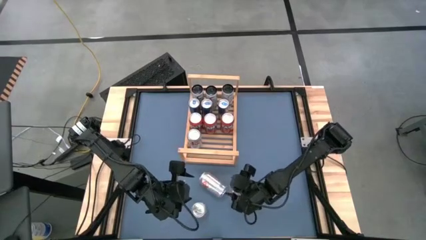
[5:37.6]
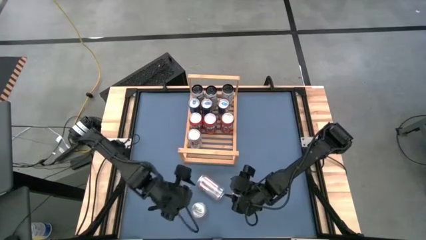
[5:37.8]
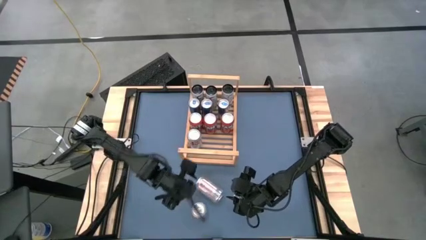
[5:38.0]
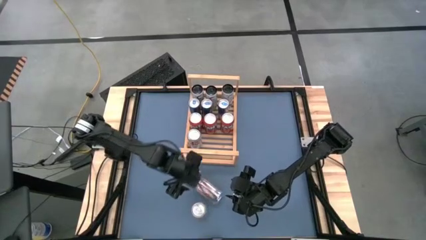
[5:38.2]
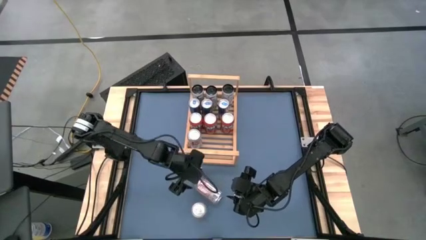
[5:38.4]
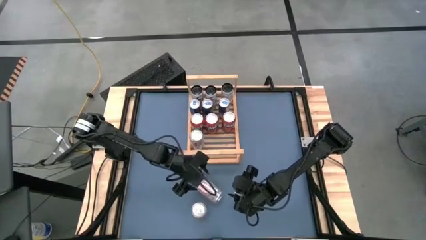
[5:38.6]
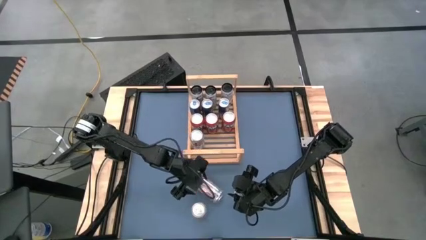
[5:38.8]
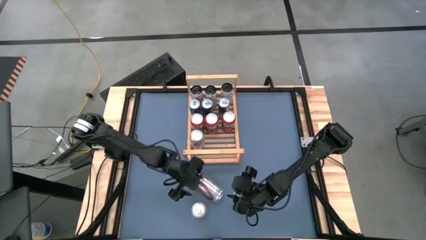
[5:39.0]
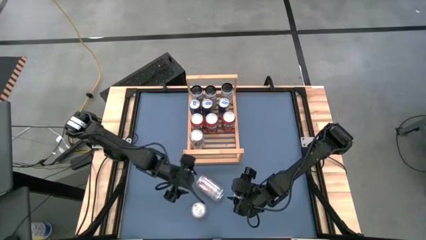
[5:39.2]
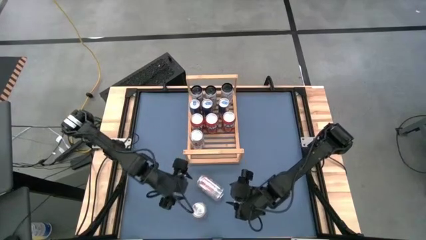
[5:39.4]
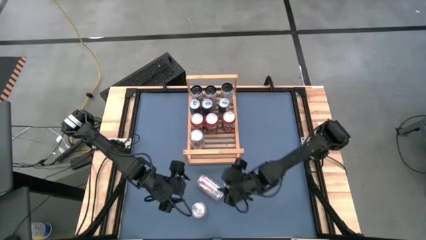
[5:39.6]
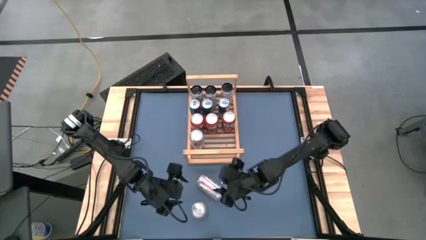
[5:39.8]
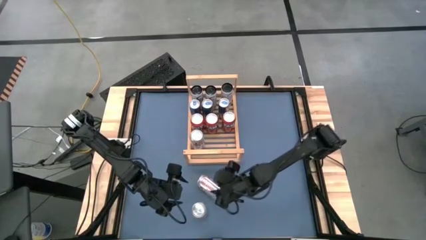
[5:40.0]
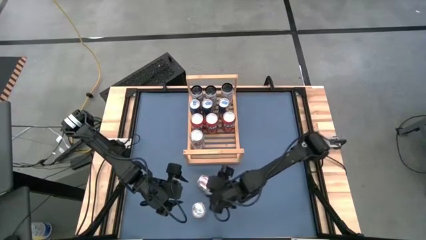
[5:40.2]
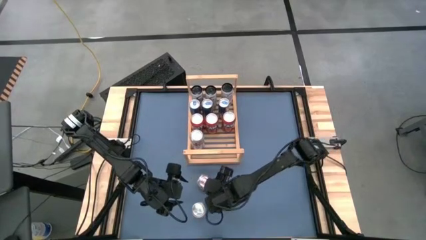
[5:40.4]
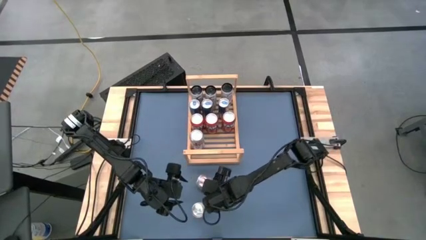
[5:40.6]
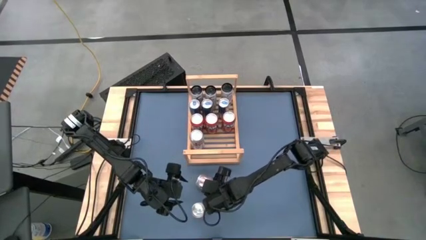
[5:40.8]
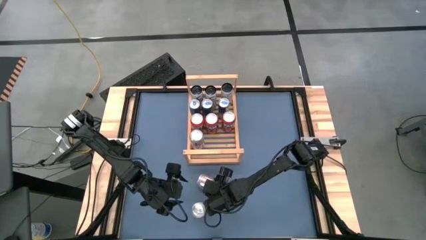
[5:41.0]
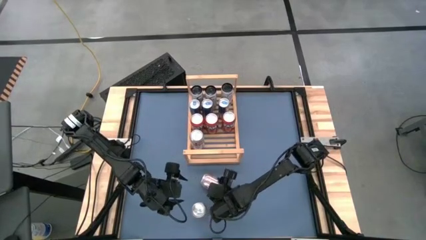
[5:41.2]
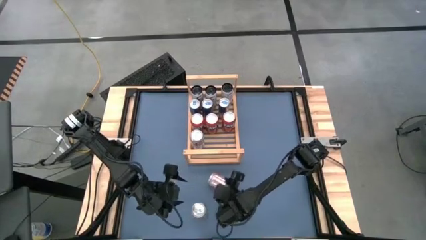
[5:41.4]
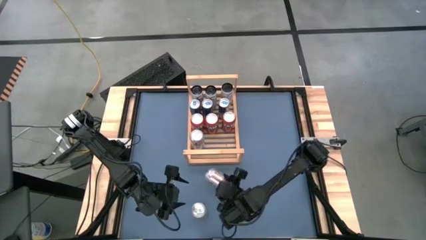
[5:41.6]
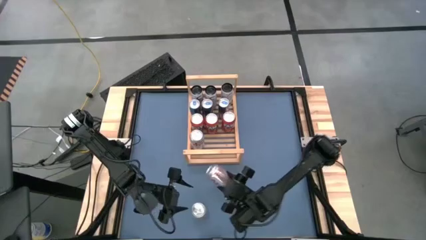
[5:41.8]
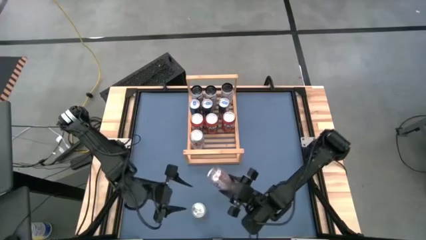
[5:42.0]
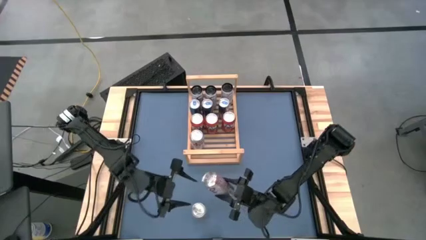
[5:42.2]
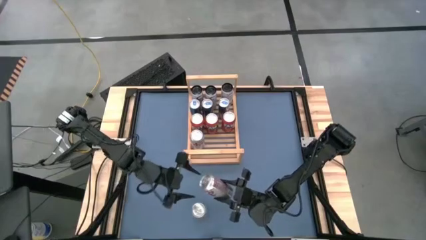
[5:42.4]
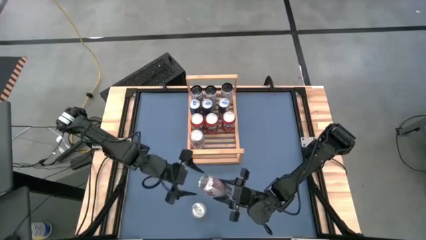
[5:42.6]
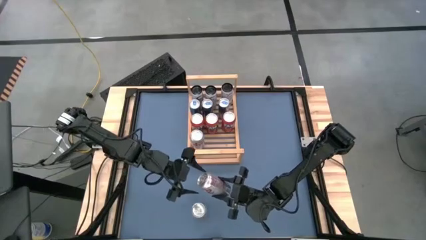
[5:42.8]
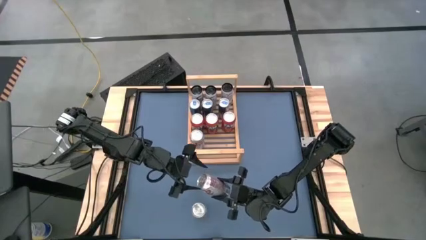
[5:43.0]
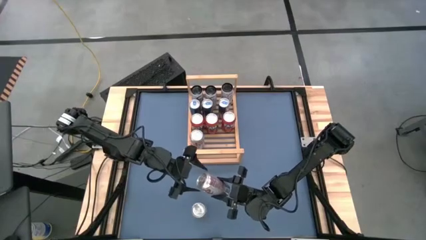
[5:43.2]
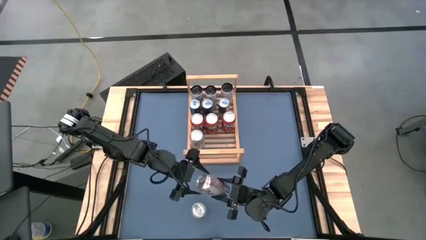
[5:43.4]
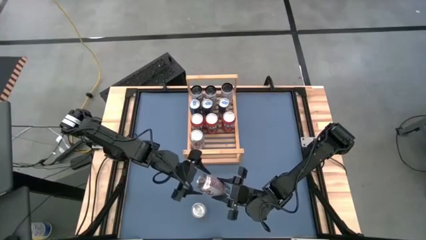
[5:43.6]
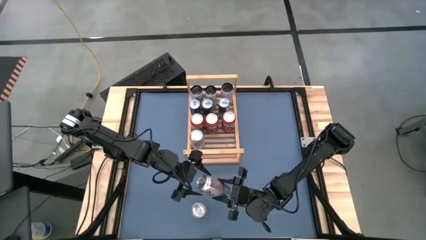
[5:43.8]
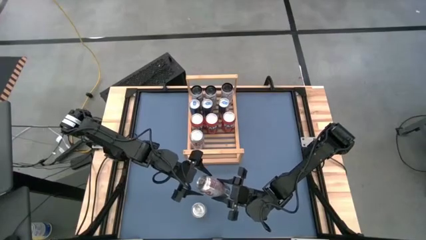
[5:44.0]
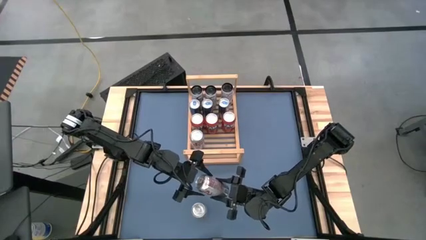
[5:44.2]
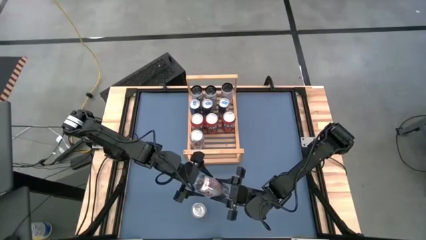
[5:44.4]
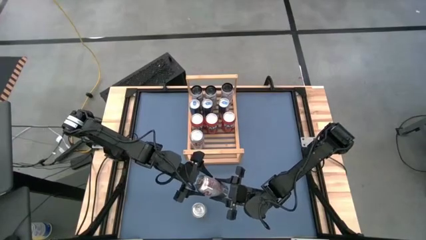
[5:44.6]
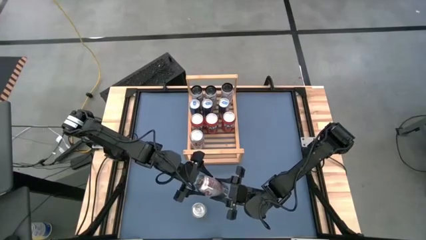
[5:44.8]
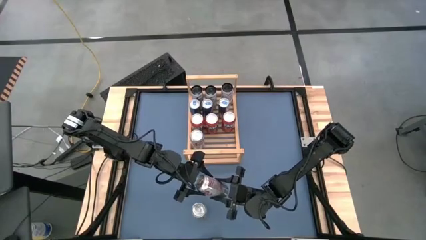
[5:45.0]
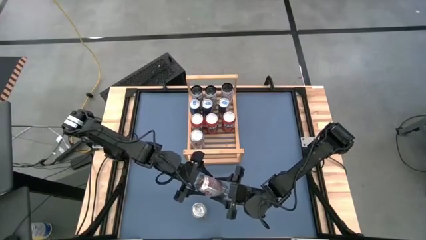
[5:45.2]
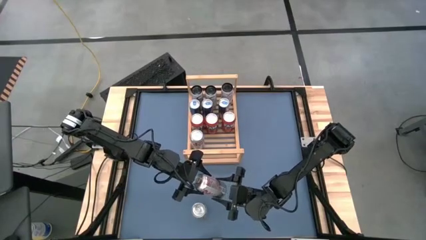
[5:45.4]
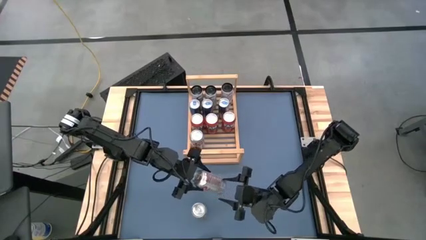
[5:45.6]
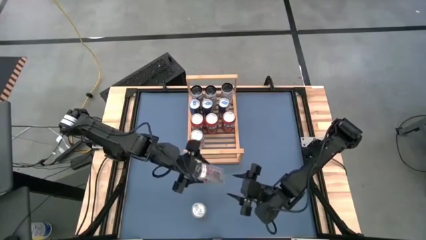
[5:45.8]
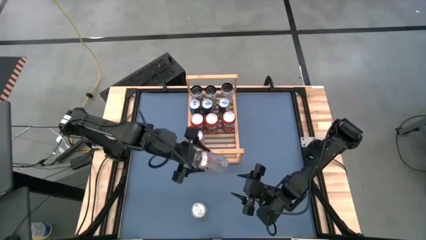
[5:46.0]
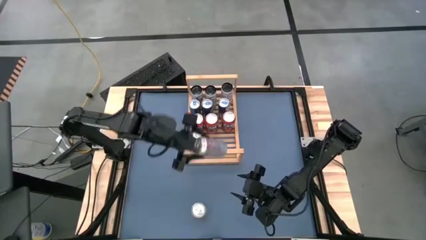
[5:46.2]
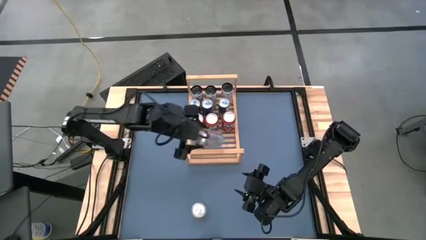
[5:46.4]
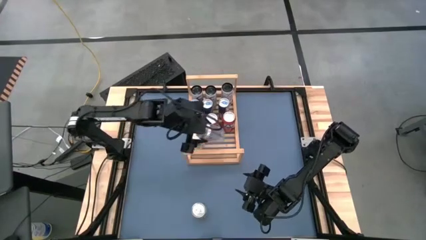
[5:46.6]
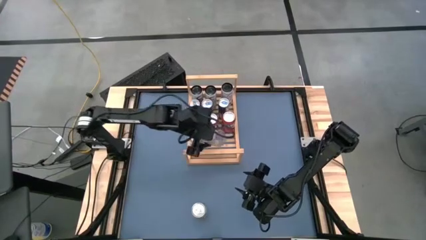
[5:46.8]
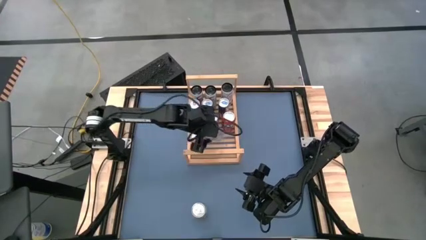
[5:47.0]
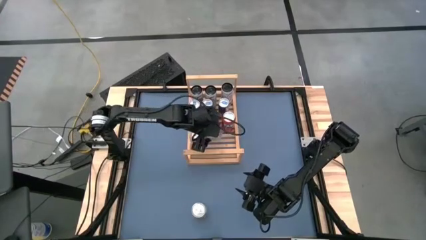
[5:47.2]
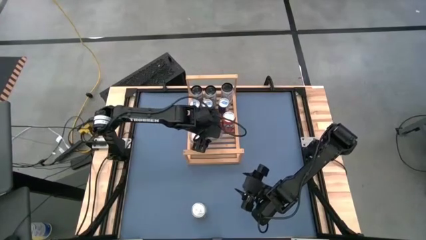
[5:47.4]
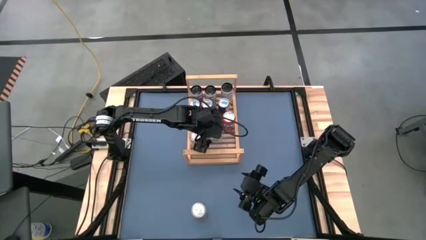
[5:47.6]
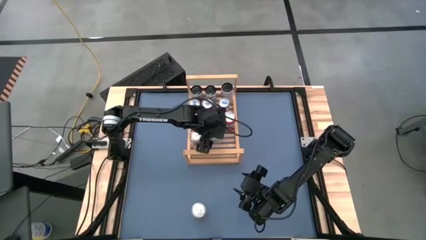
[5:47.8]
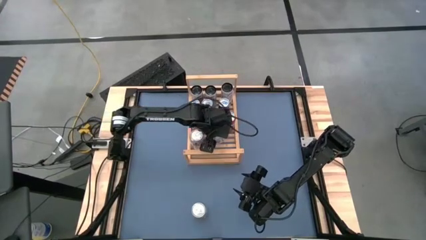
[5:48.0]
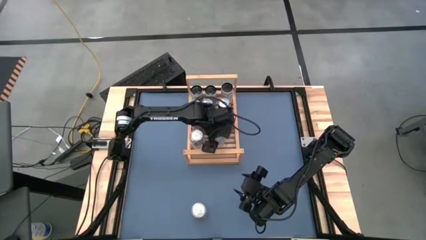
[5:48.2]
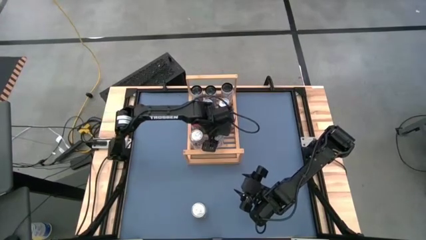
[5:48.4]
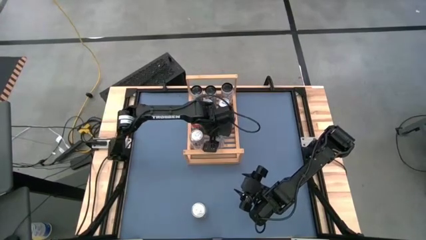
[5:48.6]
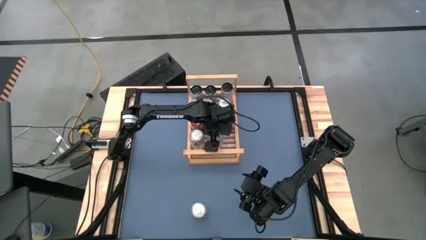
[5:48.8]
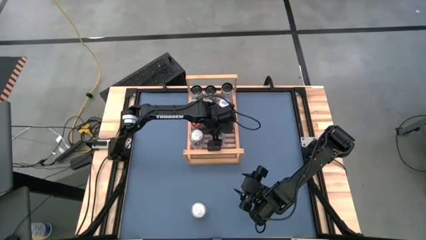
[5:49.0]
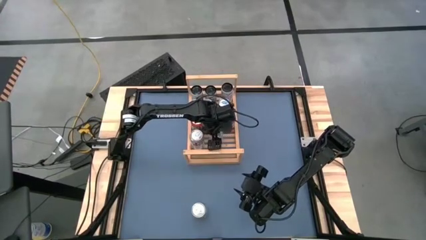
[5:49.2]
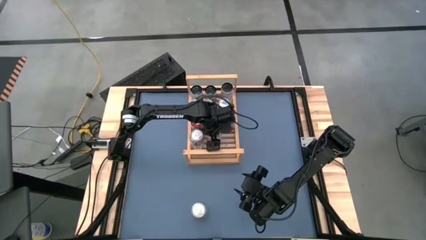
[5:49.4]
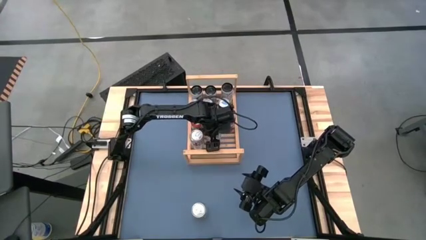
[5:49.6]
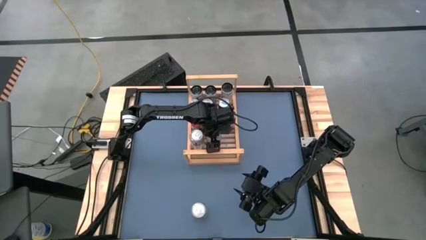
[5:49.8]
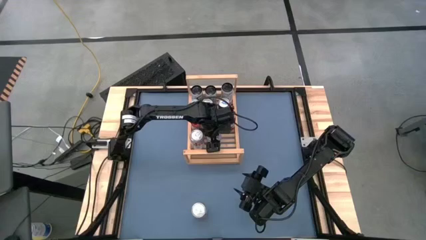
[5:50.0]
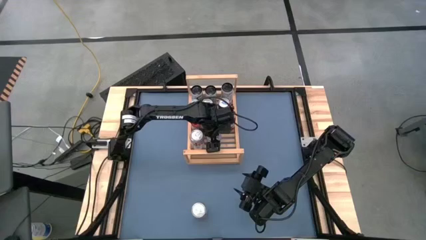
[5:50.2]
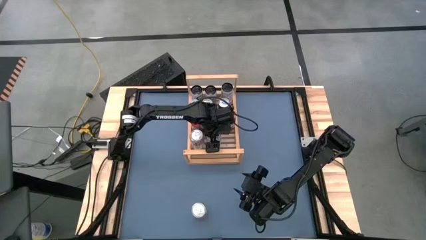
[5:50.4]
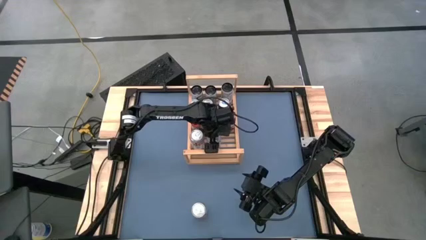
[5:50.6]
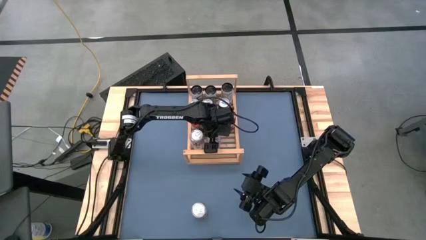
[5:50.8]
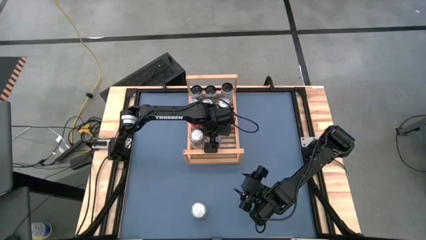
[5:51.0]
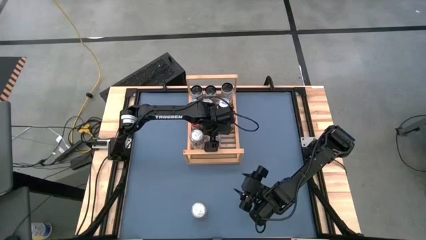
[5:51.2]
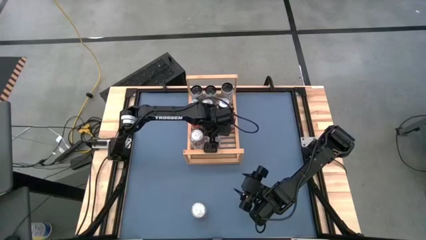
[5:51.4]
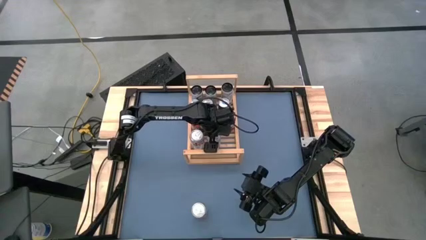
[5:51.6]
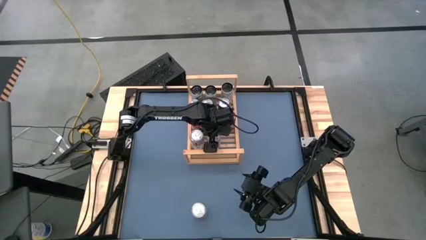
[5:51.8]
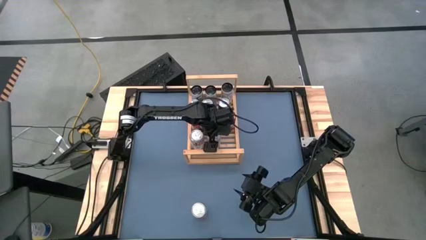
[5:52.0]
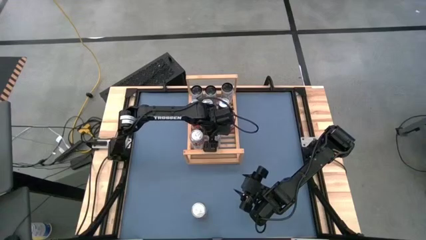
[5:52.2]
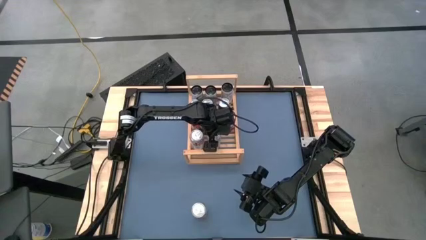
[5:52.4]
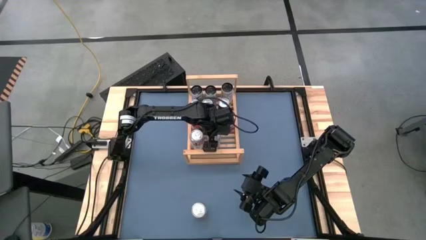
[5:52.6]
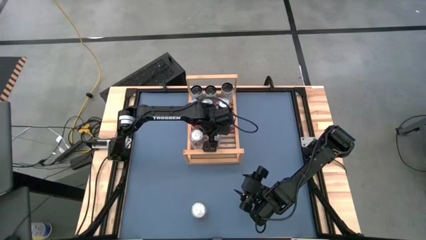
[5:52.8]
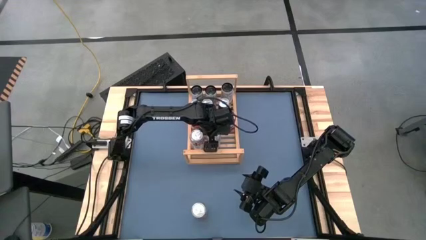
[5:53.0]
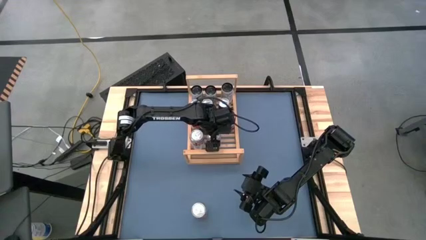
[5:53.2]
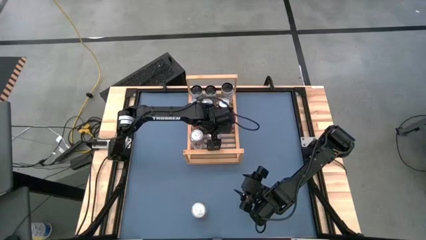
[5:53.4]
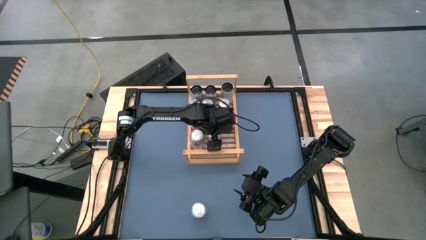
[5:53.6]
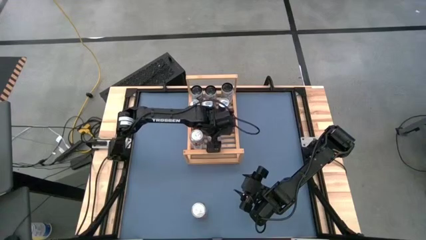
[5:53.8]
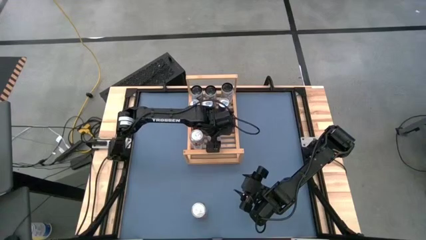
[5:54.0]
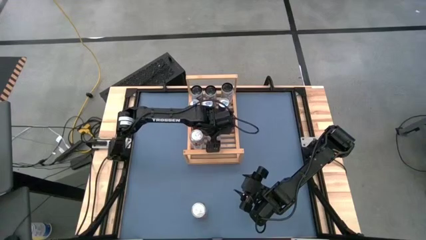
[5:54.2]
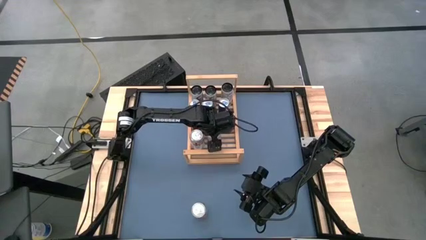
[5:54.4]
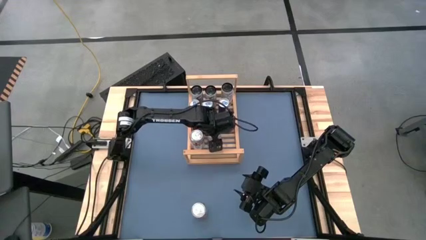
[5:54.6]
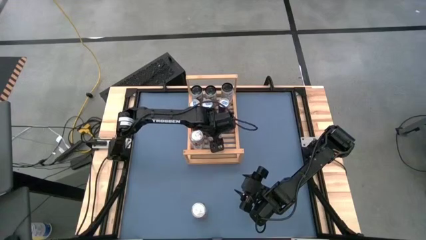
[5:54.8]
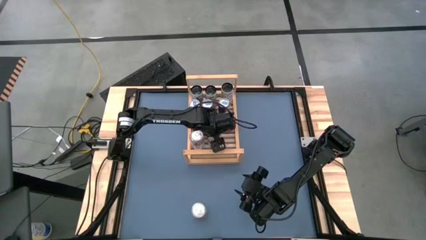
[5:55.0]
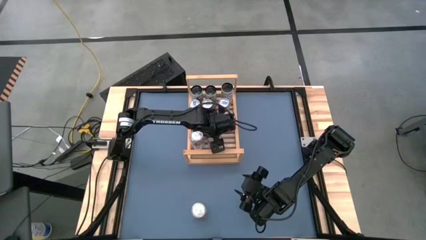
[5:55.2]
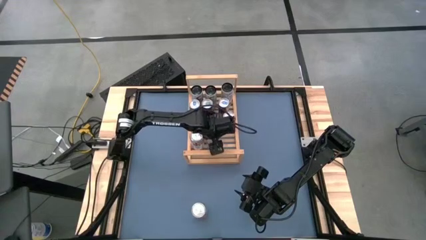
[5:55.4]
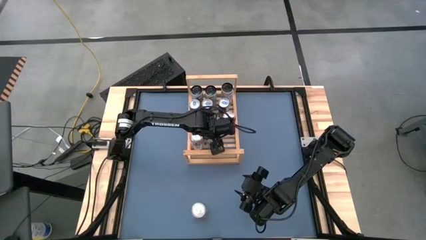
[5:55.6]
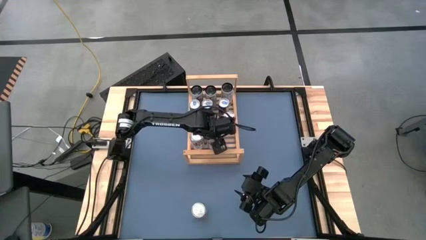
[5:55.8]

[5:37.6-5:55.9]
Task: Place canned beverage on shelf
Put the right silver can on the shelf aligned with the other silver soda can
